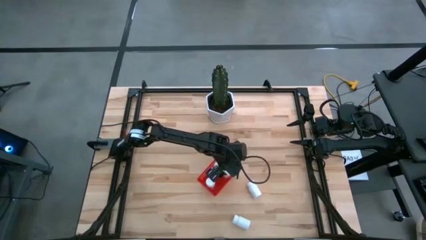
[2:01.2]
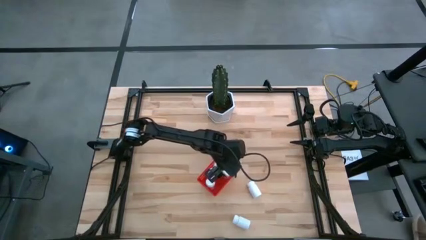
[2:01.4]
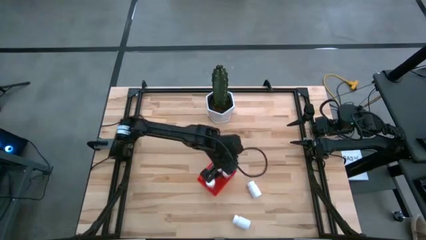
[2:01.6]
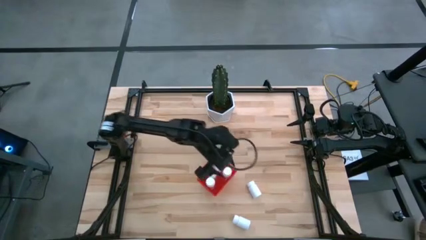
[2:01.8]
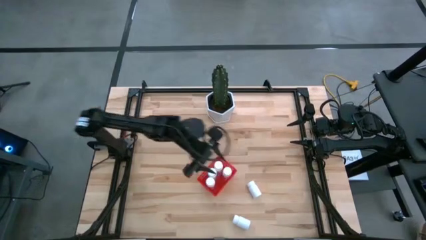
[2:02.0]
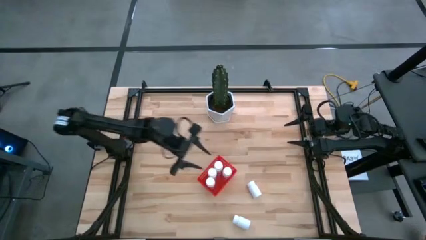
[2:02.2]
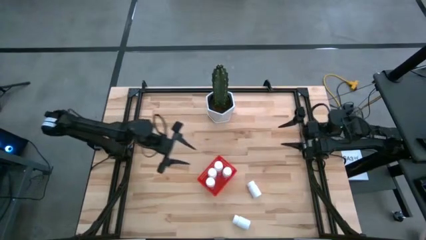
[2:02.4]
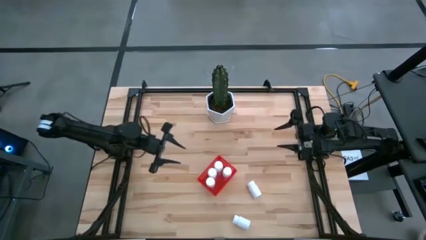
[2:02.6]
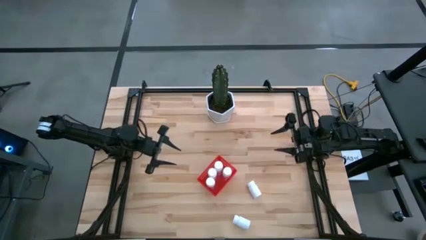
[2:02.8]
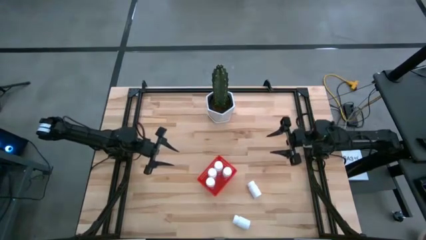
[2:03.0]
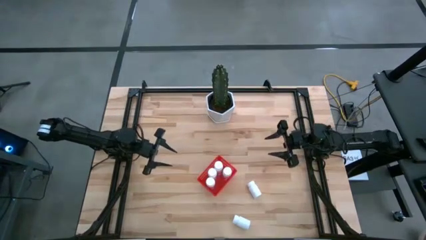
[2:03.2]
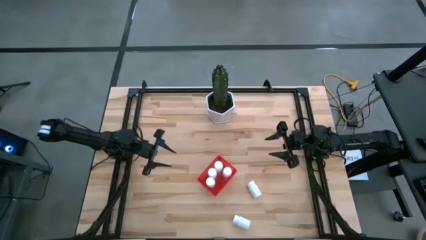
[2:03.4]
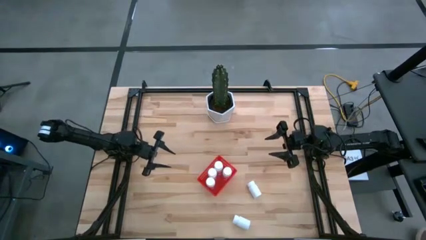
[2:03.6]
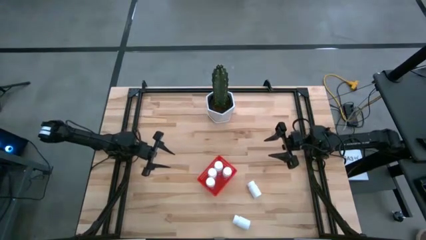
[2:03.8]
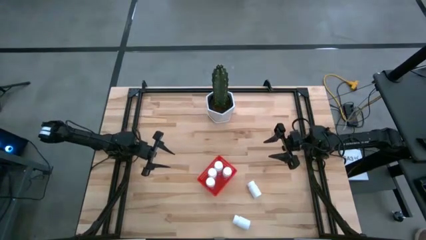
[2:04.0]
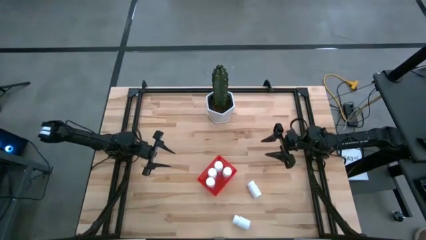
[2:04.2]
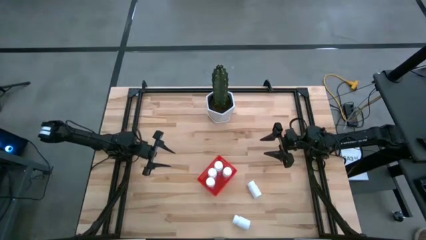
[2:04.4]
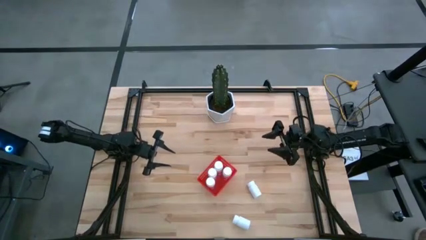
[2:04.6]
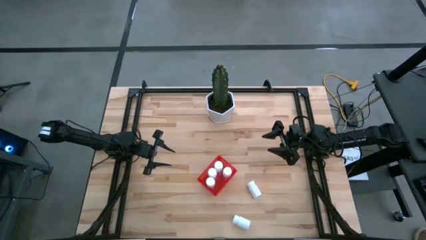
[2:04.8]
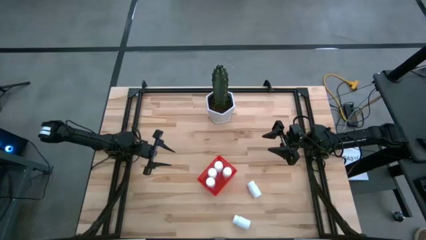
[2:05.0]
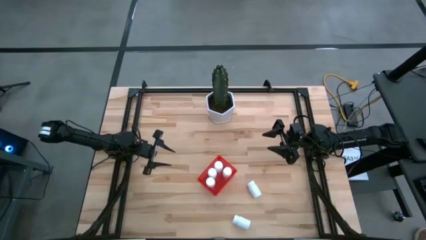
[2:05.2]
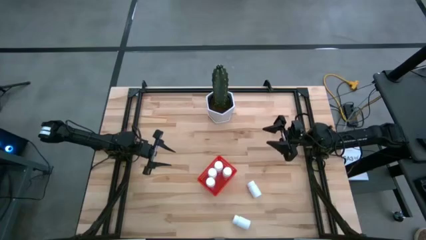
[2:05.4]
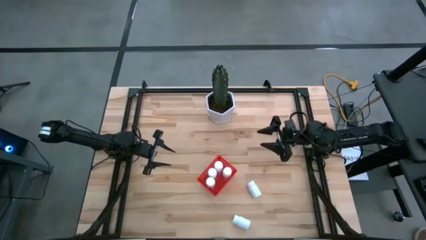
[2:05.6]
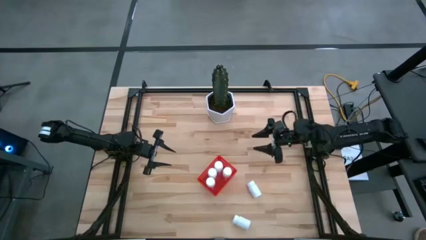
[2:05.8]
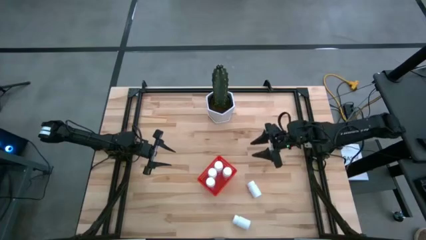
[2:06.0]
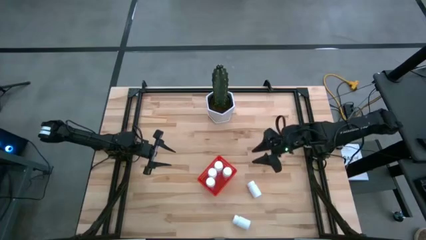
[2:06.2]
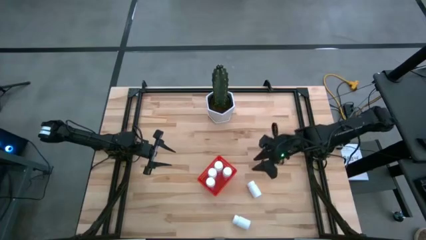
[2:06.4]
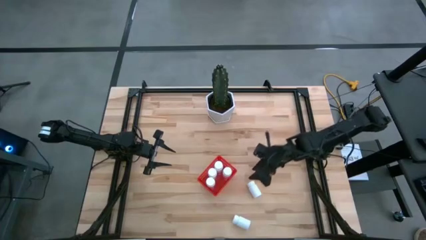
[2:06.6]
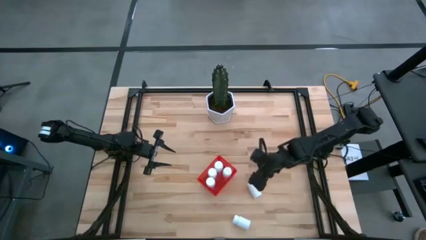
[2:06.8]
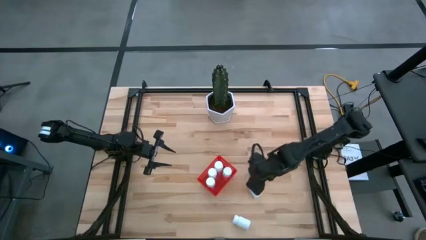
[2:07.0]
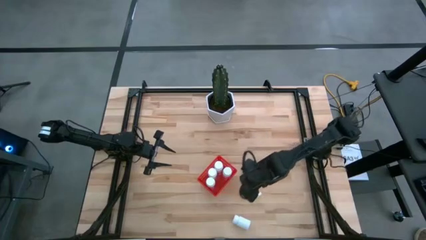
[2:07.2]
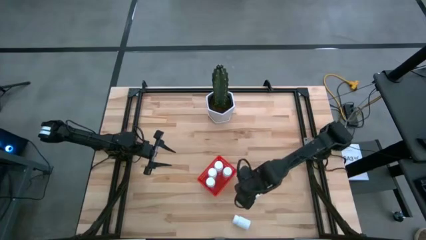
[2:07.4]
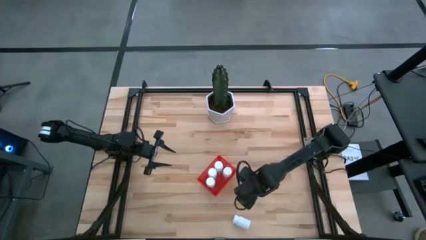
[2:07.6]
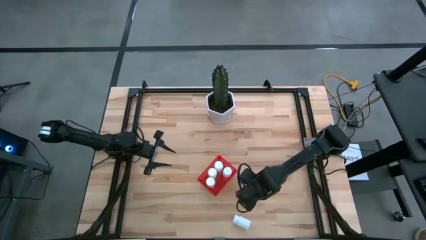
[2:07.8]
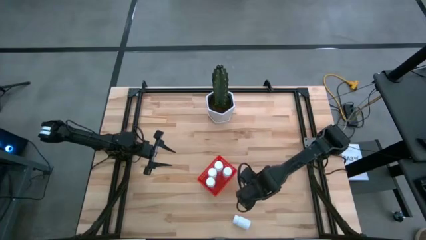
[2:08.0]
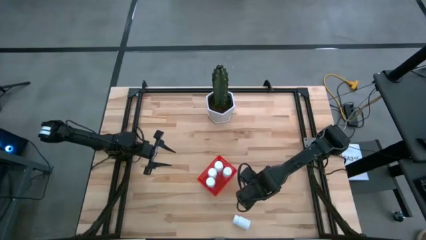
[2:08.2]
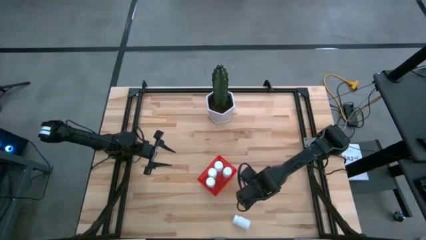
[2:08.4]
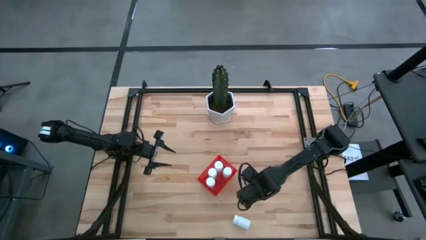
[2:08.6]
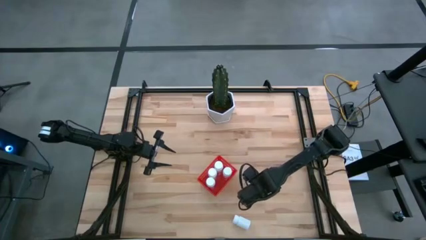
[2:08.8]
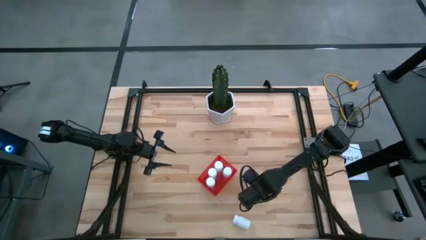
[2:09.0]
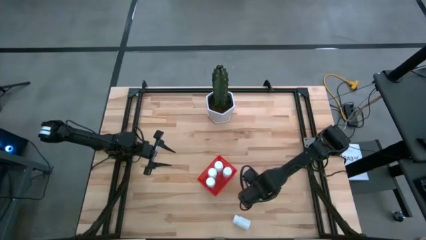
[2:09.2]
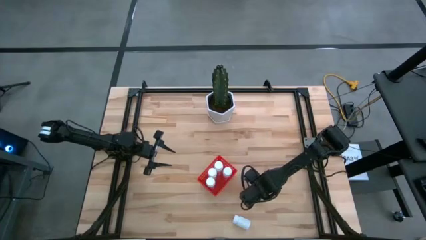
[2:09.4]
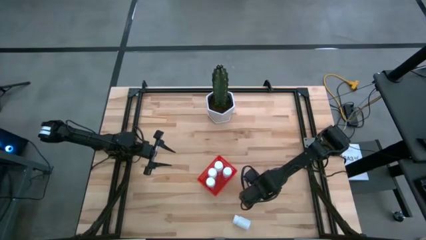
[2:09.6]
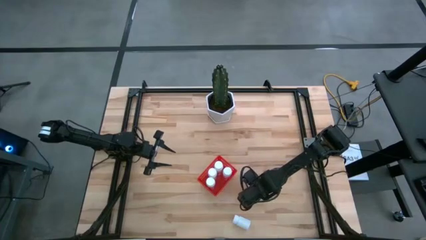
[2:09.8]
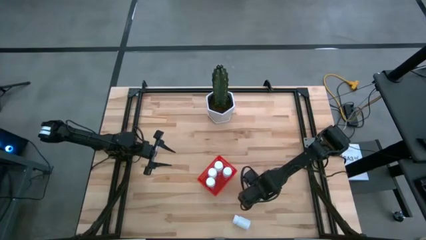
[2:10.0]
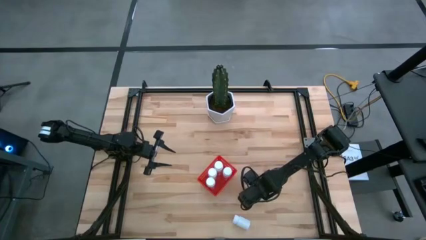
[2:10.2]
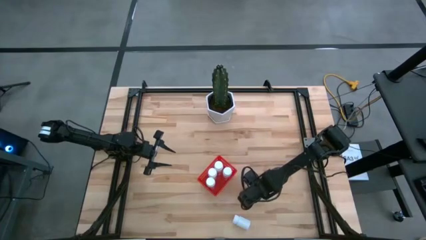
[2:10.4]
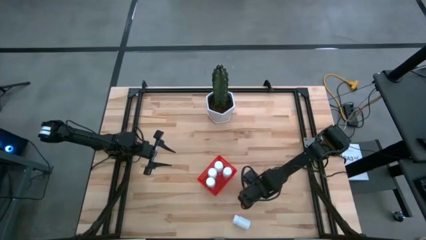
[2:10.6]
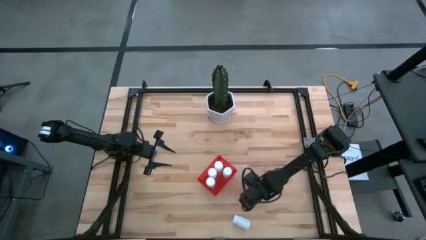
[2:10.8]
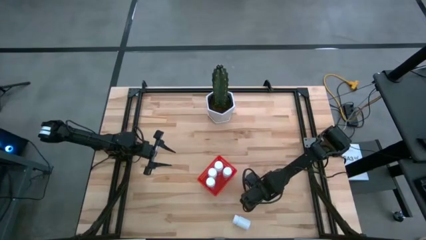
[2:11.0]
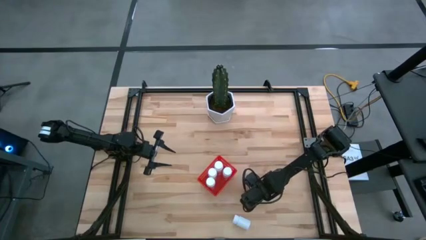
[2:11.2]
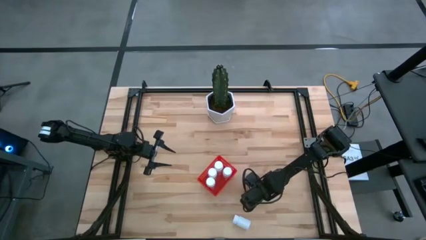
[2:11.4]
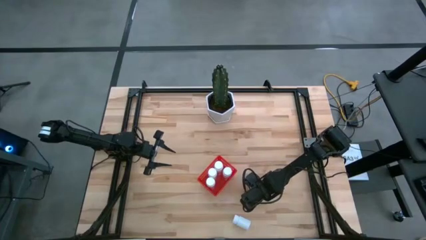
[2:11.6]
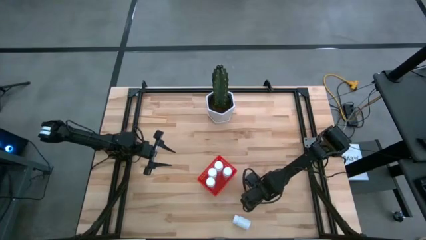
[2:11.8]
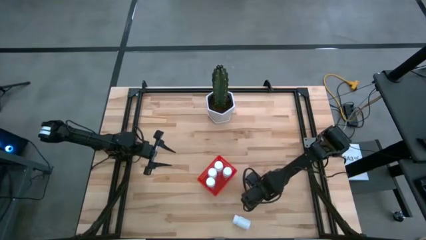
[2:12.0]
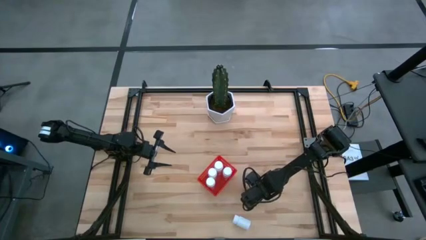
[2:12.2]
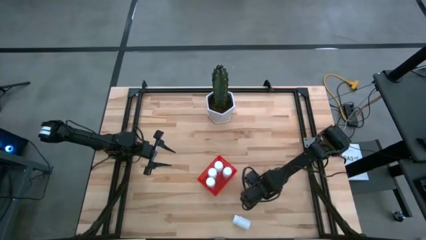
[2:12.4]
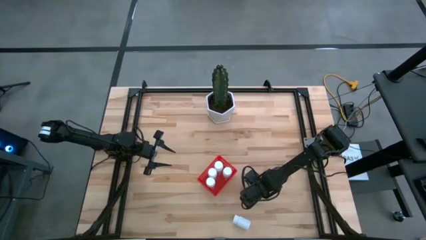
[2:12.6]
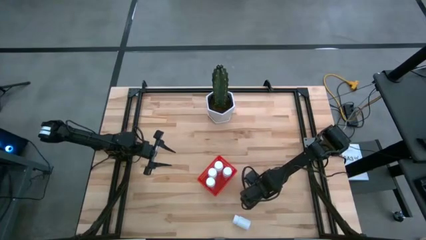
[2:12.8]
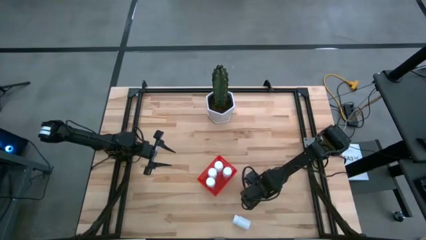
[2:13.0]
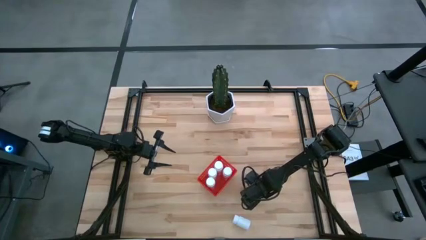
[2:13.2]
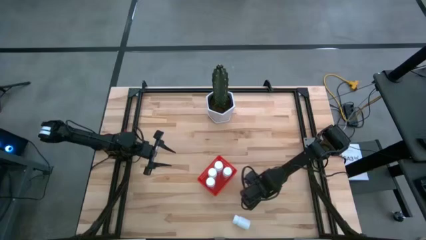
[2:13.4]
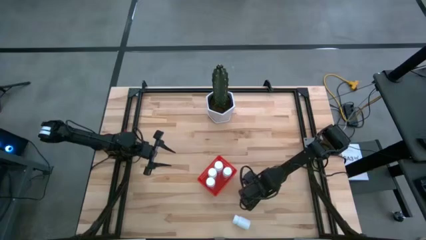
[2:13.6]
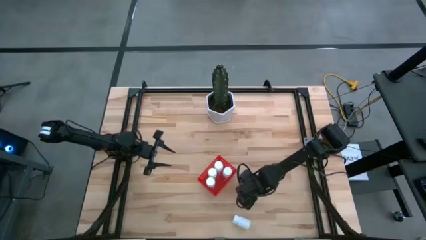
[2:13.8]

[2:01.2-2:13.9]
Task: Pick and place pill bottles into a basket
Put the white pill bottle into the red bin

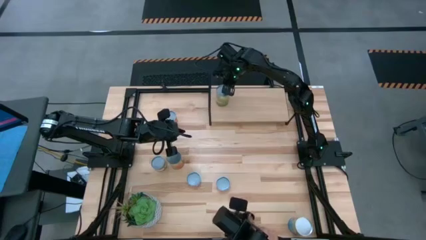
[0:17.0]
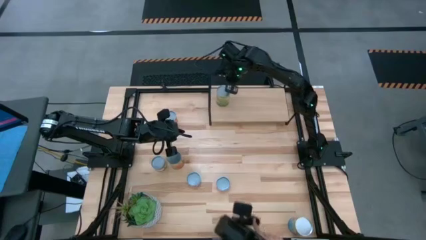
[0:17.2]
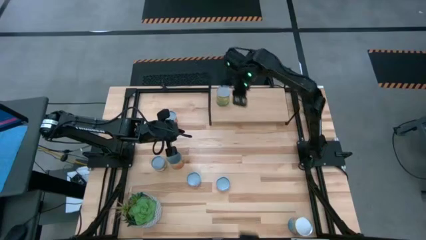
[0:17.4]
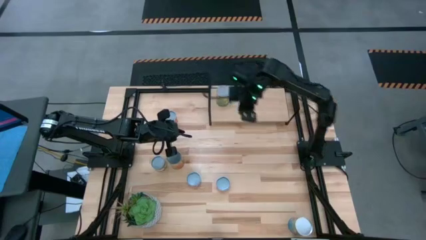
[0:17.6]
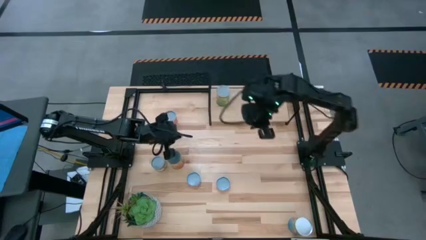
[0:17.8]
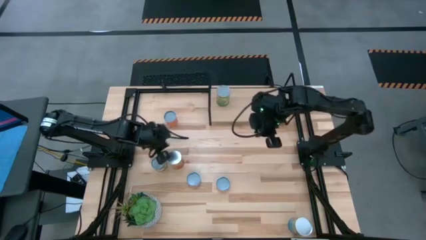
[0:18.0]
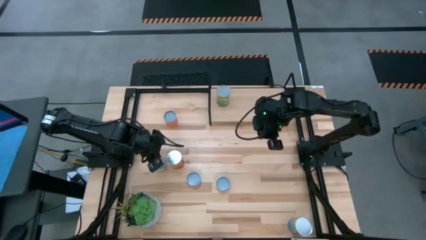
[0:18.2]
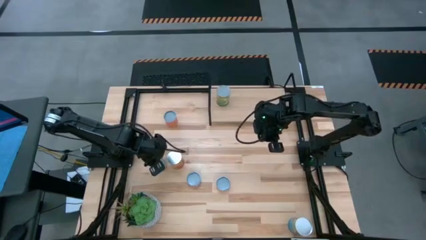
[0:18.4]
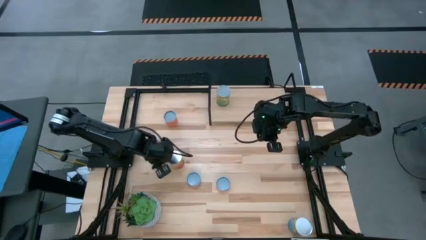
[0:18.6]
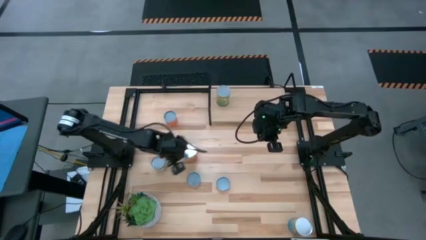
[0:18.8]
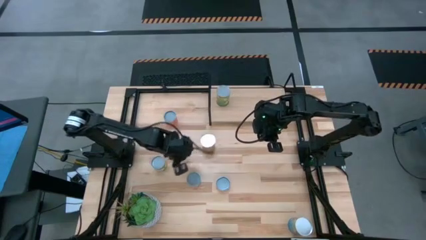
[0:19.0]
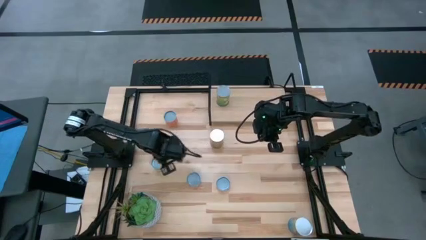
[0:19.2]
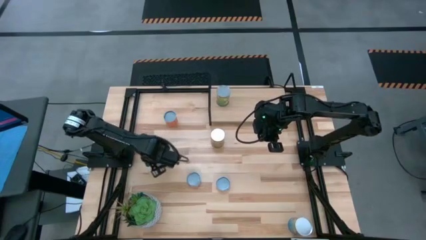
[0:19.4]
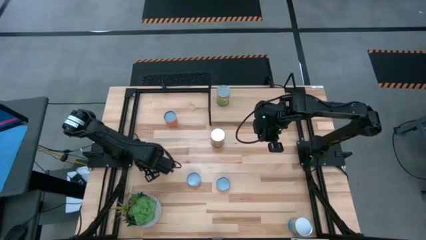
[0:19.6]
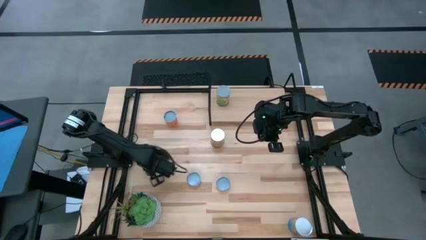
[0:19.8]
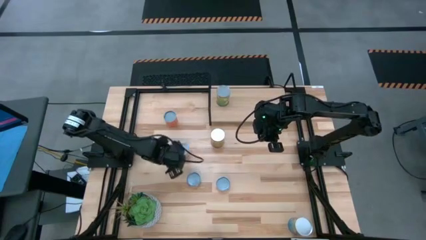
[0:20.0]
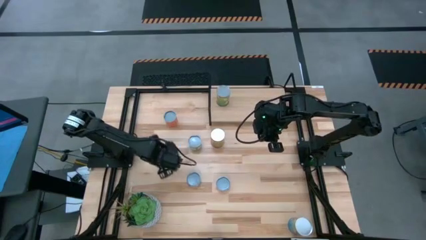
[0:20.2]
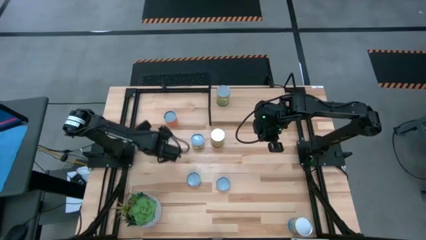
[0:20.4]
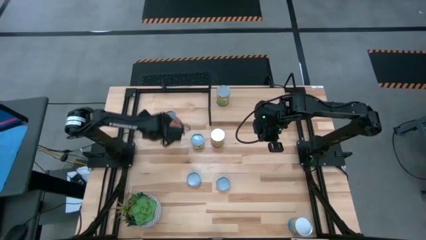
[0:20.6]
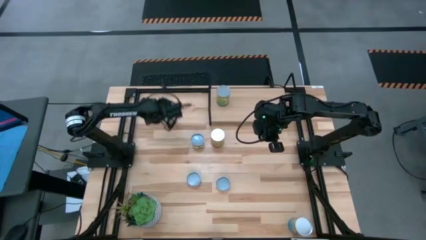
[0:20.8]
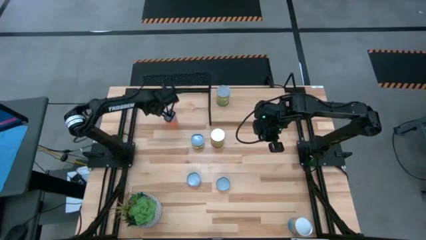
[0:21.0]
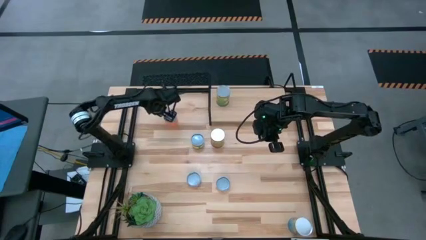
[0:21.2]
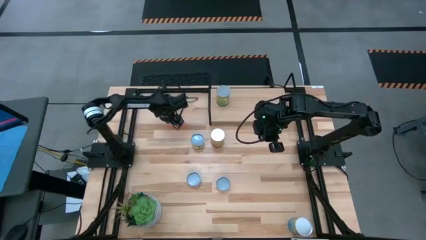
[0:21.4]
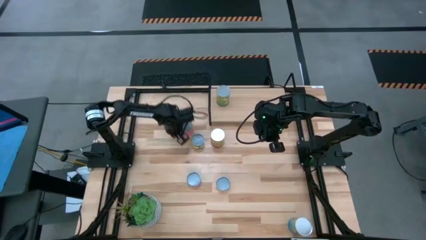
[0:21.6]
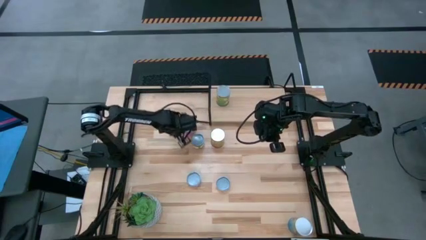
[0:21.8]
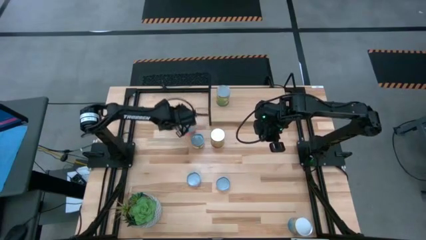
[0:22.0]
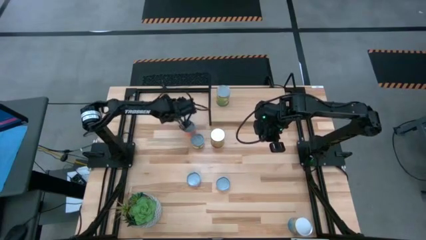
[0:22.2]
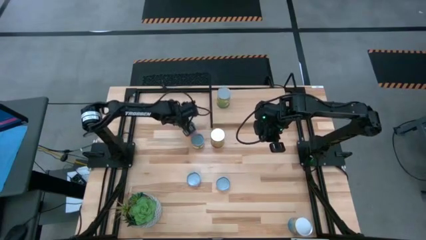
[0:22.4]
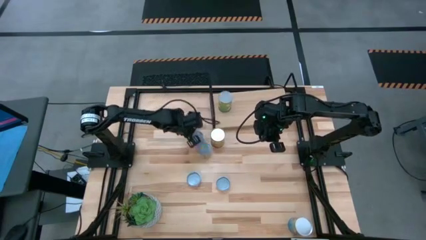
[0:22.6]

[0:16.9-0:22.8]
Task: Pick and place cans onto a shelf
Move the canned goods to the center
